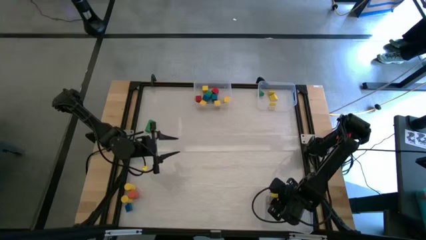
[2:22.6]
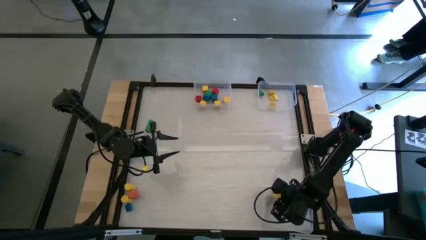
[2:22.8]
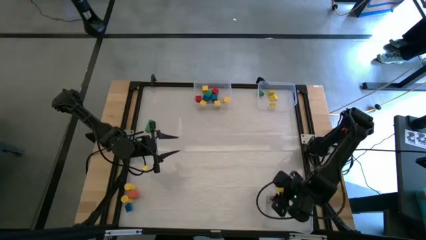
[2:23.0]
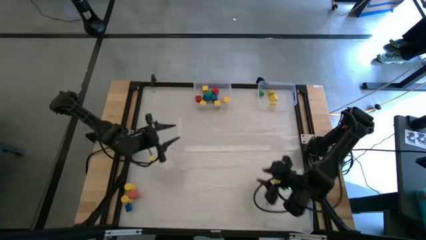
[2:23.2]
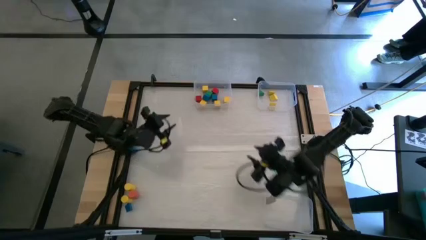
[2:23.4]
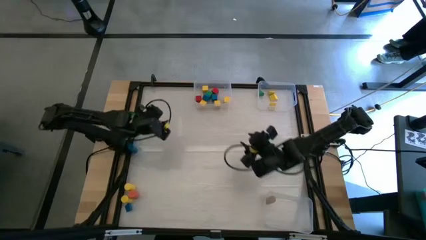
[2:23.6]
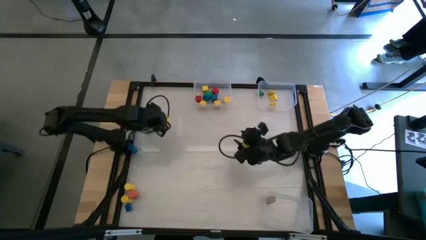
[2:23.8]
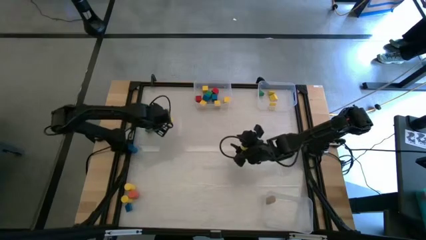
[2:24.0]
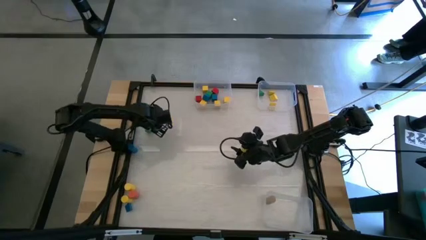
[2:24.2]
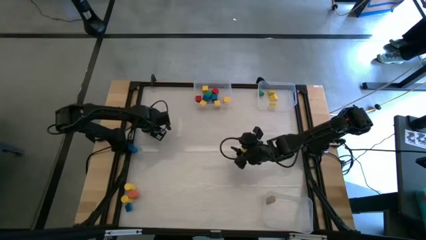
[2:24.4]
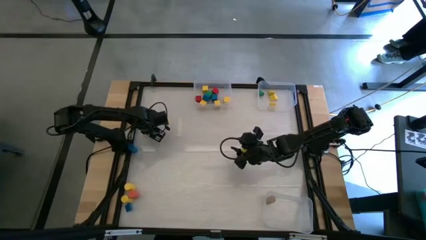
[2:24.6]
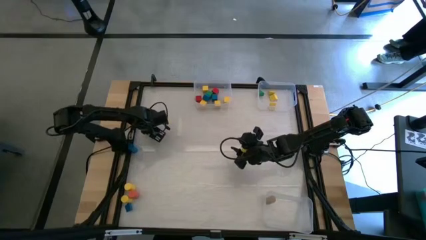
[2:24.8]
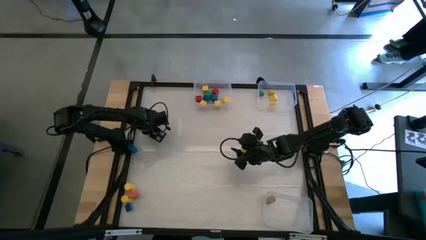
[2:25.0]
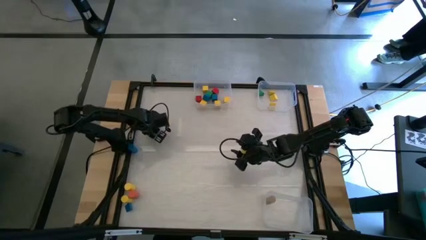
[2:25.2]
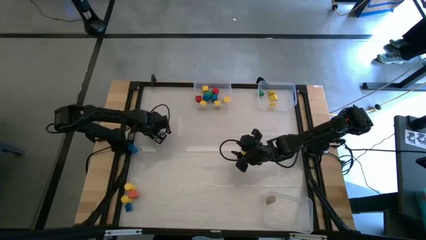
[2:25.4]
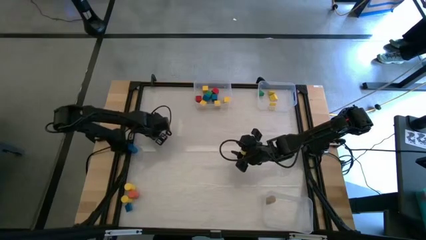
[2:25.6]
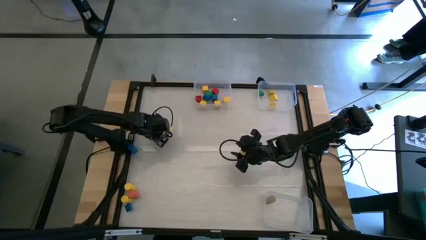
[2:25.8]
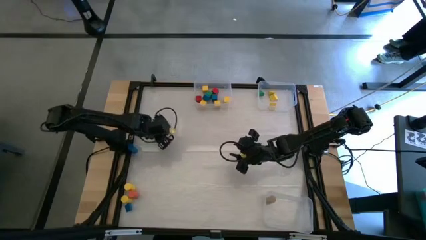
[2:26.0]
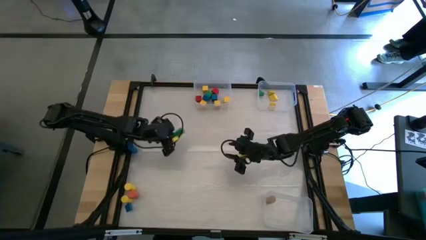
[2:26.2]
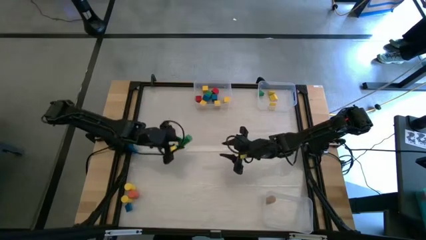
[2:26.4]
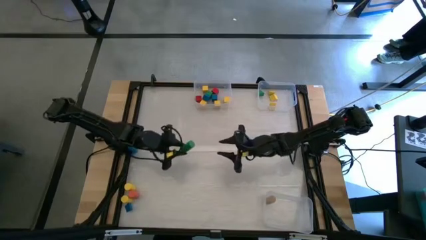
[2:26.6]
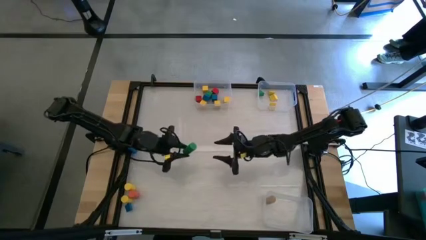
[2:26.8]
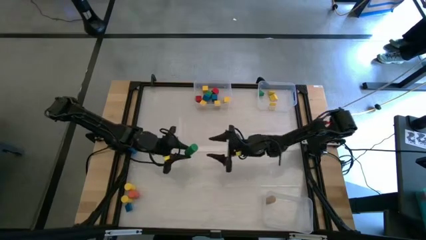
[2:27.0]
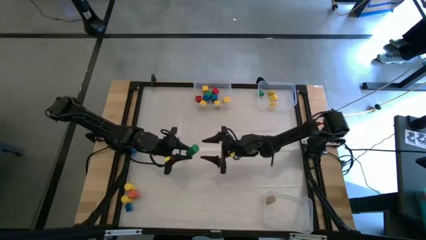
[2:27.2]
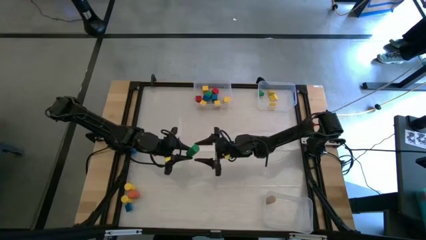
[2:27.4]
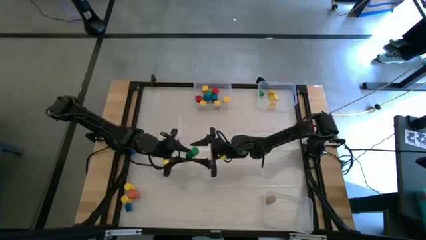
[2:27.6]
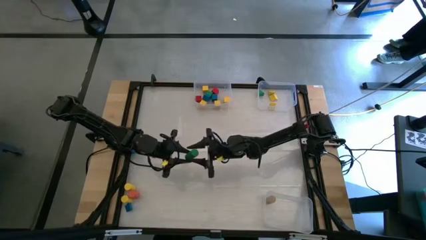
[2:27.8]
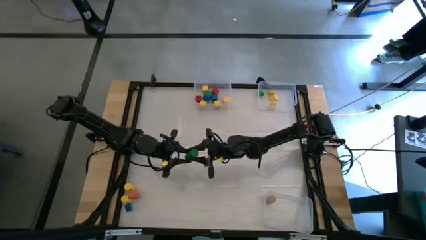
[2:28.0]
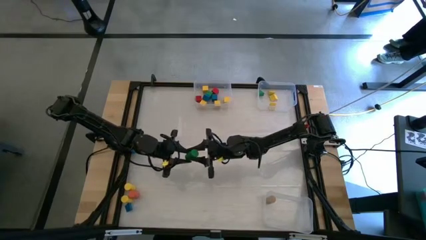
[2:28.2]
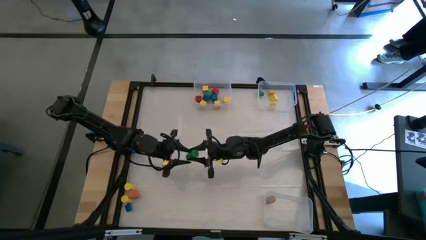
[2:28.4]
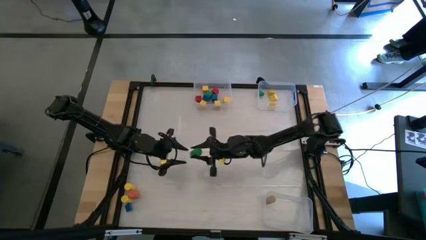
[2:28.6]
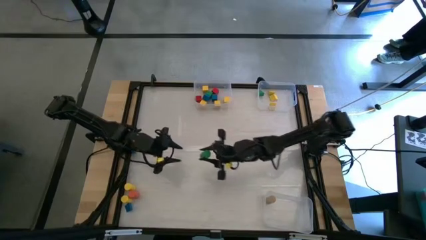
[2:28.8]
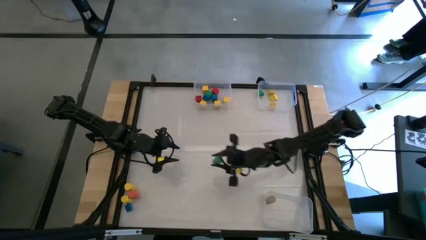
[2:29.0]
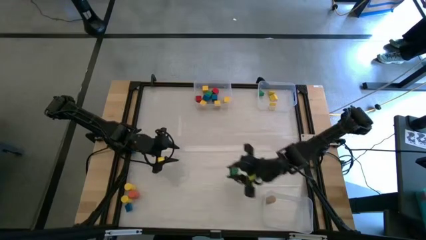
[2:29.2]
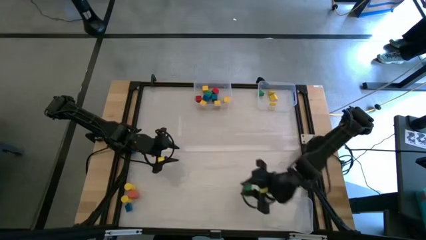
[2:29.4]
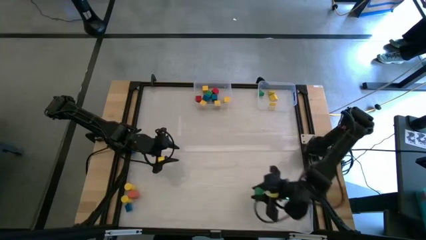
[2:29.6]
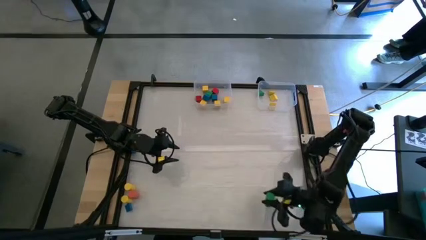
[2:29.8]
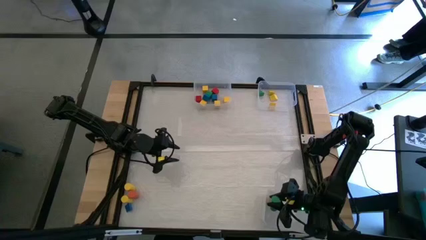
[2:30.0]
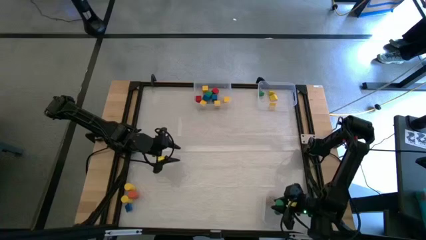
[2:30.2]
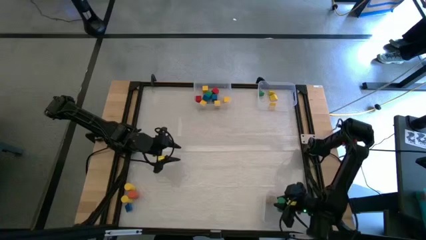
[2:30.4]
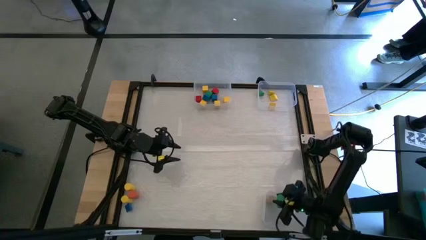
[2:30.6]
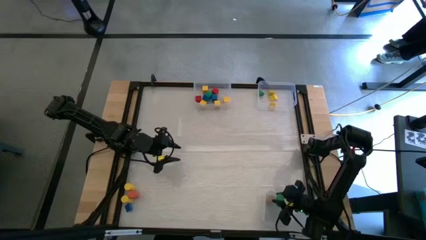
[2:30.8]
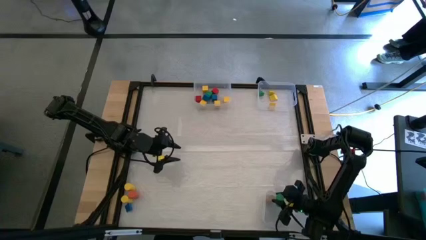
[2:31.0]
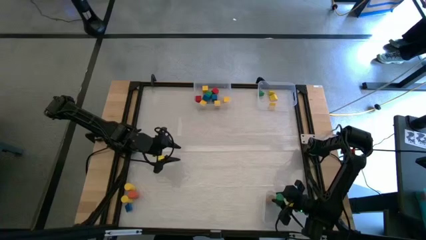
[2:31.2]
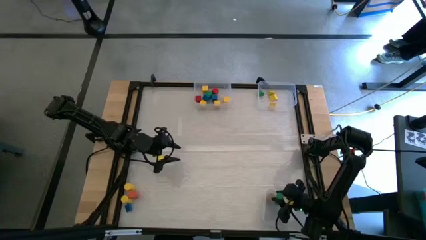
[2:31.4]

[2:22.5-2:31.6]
Task: Sort blocks by size
Put the cylinder green block into the bottom right transparent bin

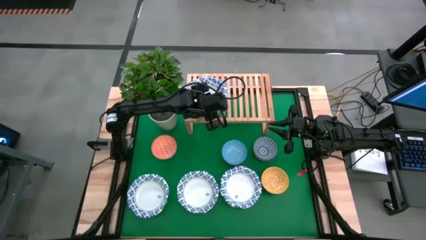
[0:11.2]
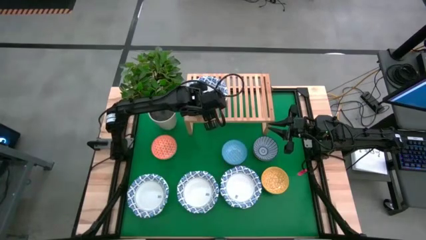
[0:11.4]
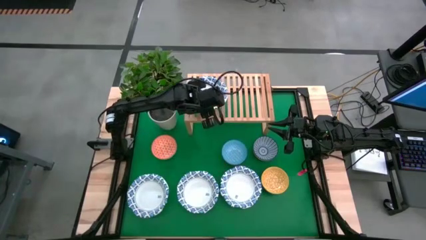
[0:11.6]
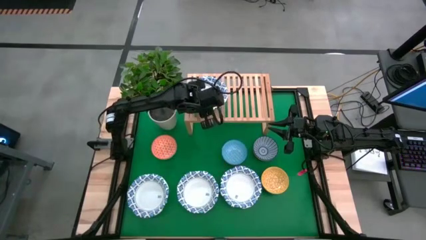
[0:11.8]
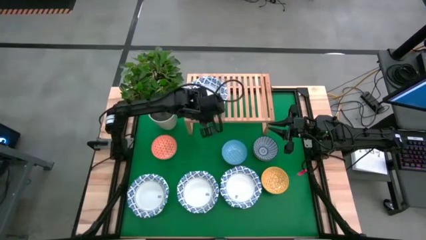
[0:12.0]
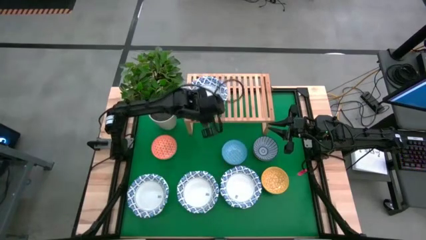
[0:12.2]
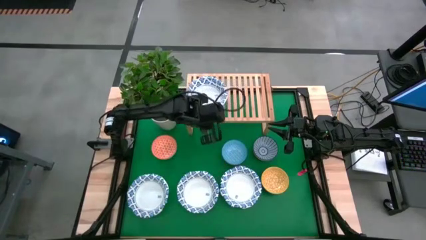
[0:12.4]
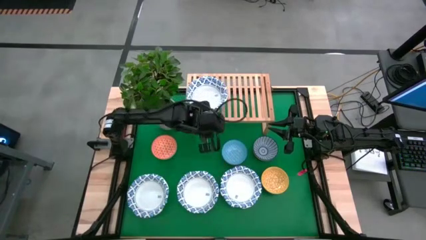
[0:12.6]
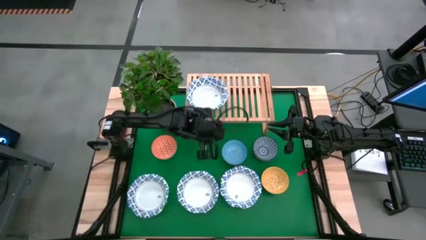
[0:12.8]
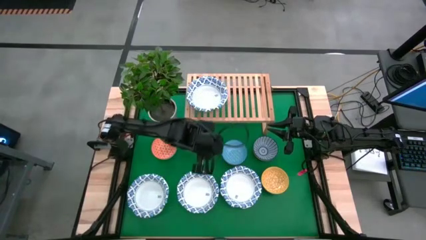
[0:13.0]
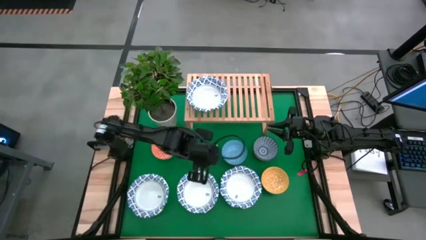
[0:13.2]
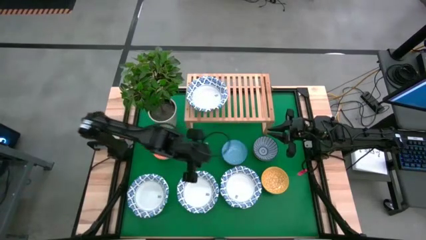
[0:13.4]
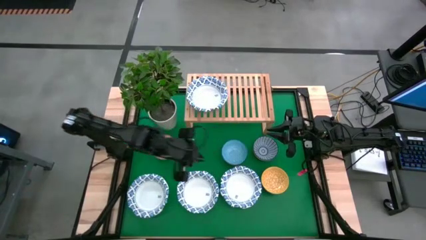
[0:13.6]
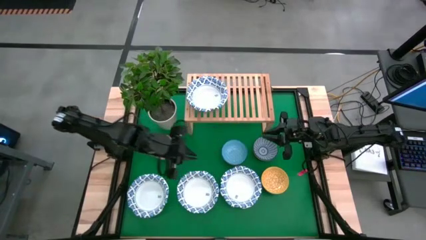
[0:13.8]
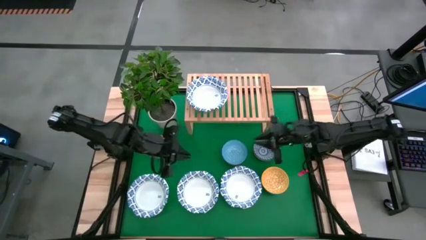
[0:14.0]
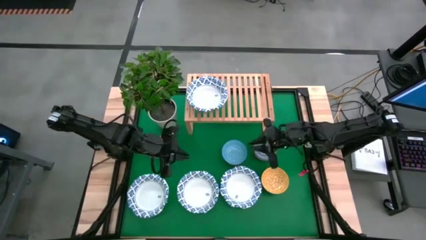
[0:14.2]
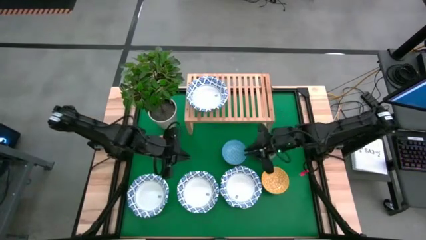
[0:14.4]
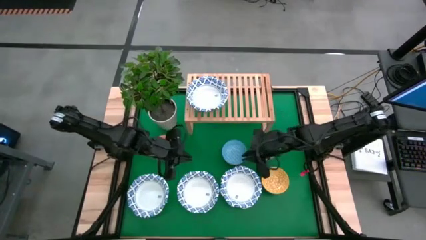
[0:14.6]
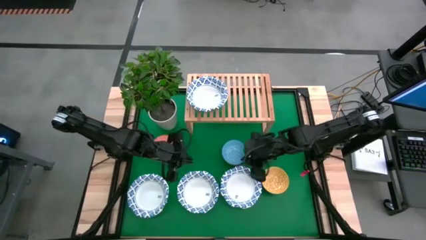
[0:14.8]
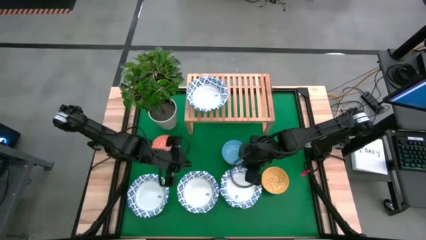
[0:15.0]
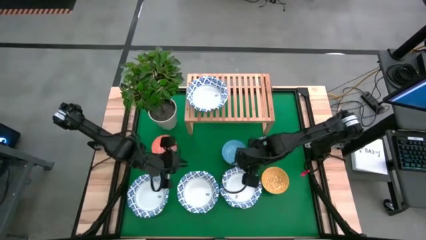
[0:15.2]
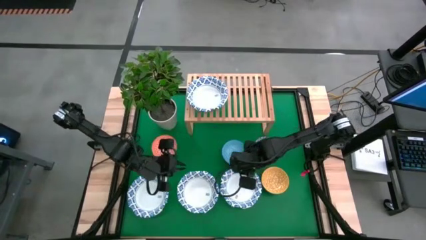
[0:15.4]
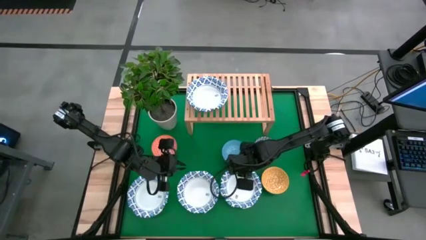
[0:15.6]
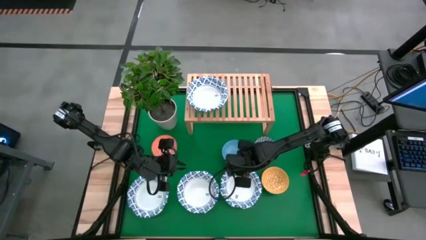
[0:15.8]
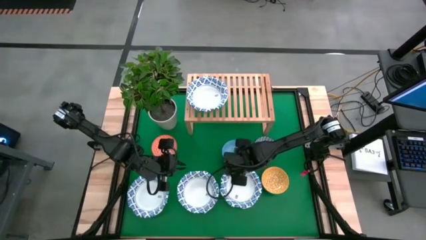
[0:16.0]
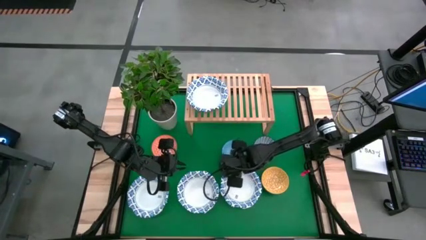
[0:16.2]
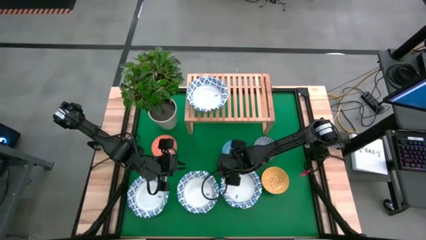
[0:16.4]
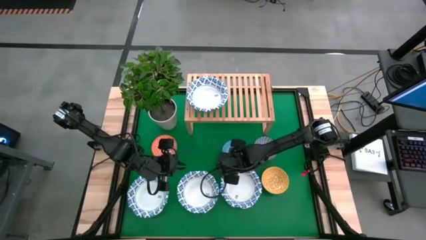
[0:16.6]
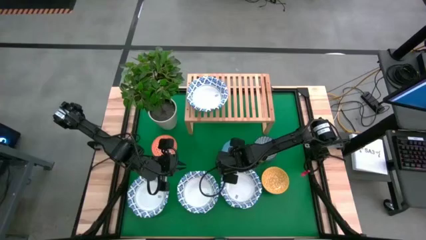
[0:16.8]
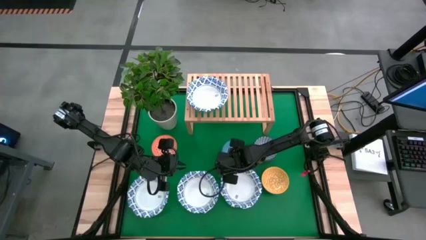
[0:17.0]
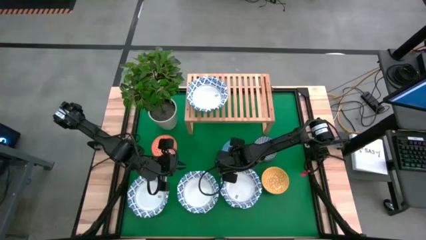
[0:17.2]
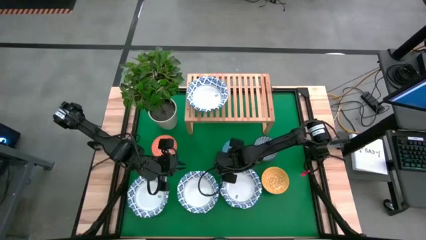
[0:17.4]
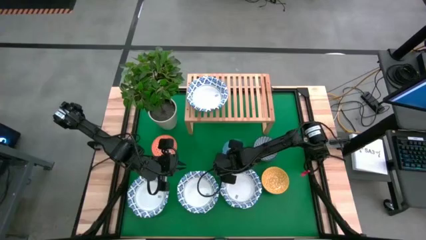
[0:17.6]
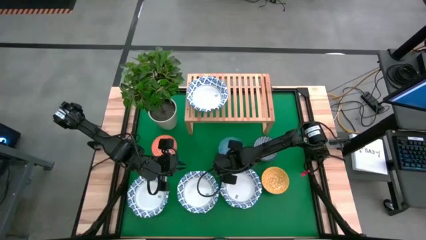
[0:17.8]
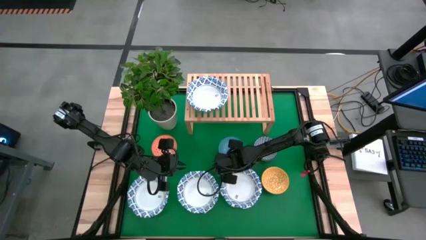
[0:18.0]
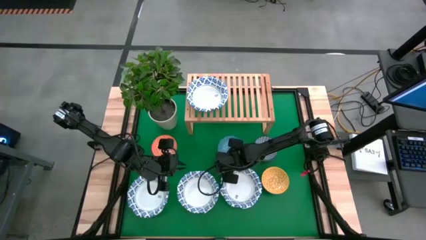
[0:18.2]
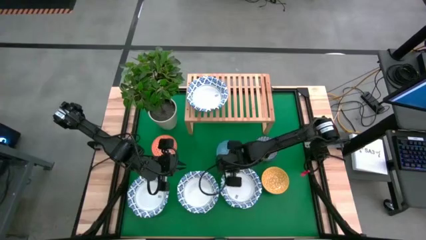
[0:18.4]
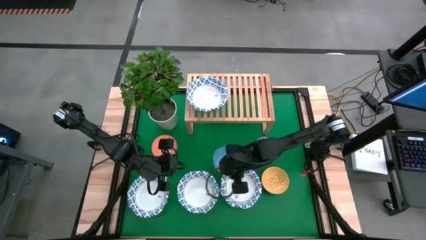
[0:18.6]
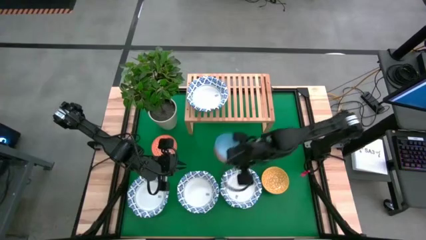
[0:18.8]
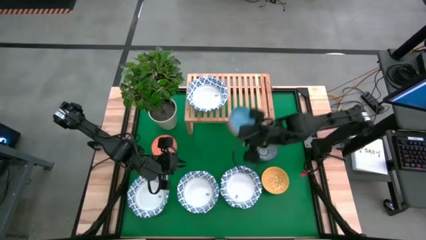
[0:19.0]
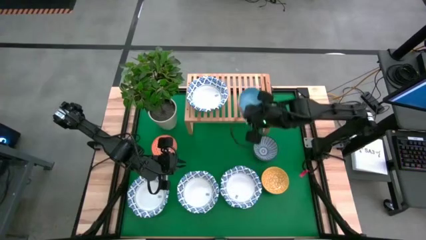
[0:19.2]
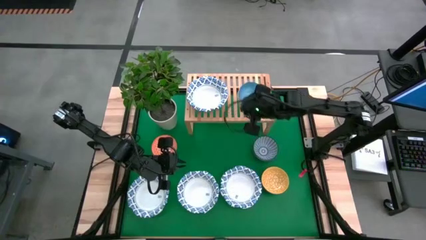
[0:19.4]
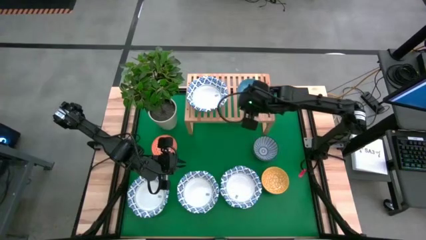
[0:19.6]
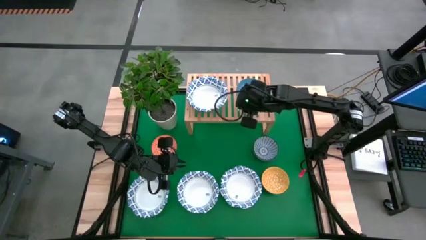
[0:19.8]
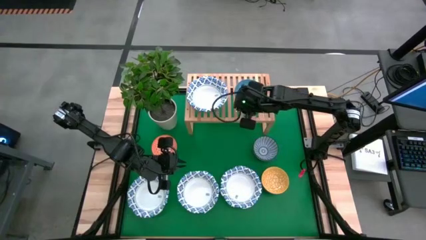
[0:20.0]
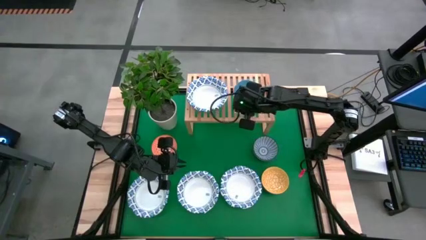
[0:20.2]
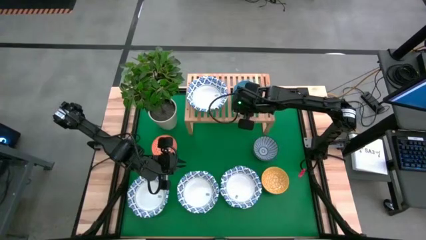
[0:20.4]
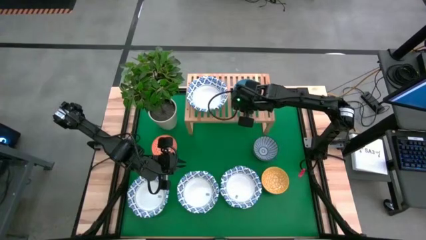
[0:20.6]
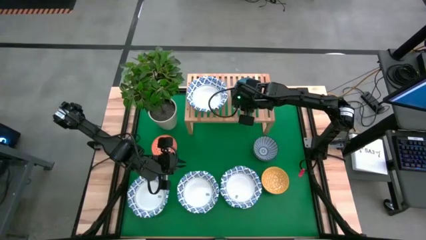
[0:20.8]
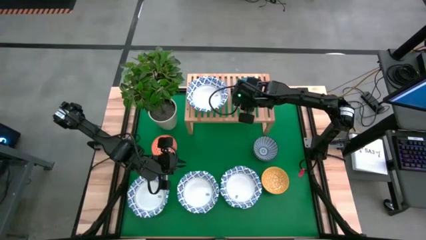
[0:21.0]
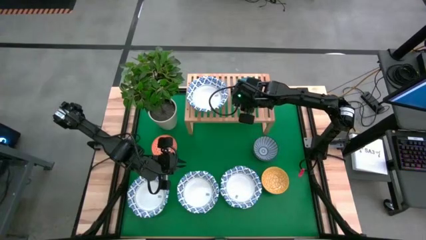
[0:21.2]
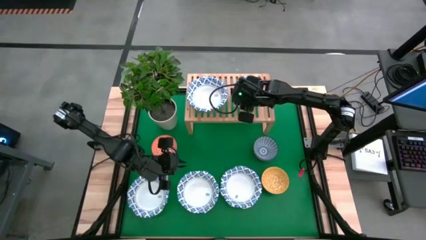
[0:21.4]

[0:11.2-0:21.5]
Task: Place and stack bowls onto a shelf
Put the light blue bowl on the shelf
